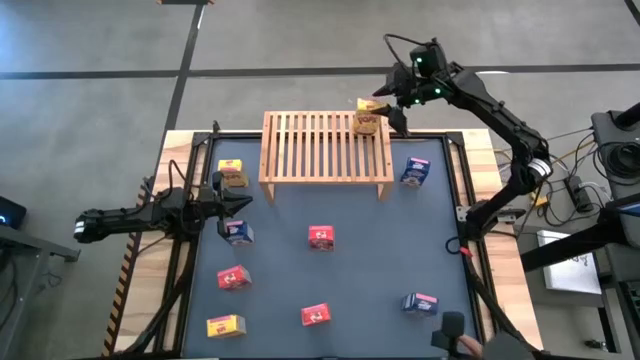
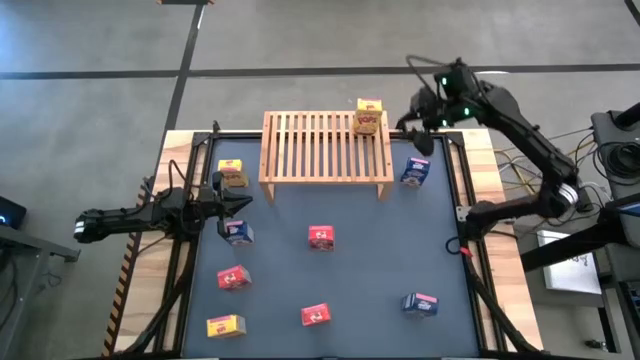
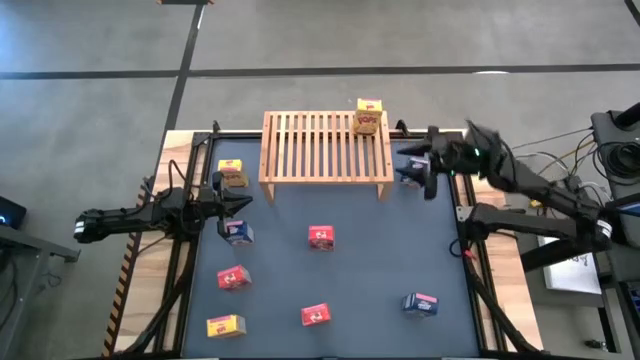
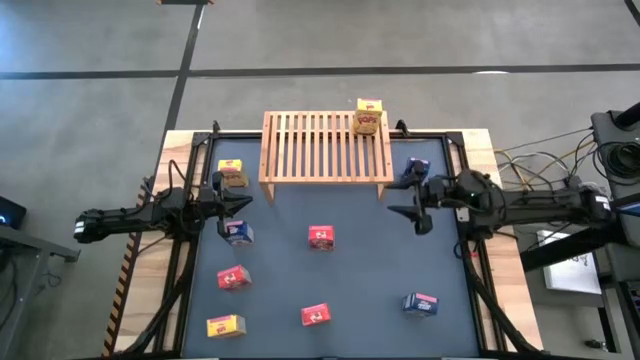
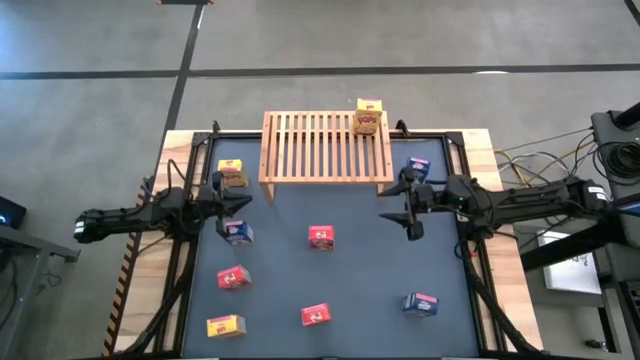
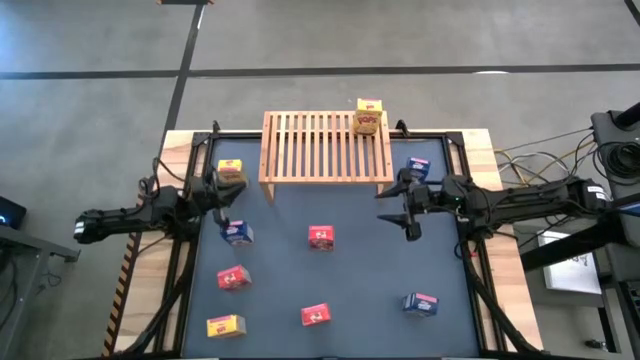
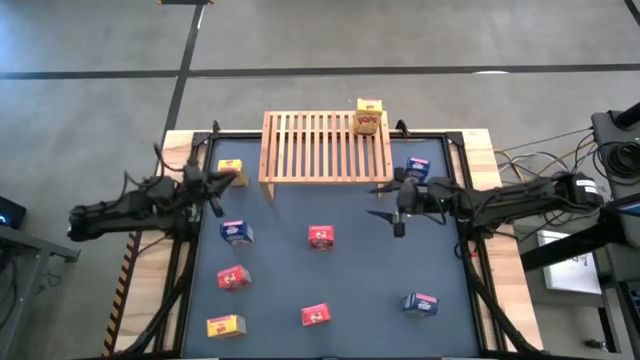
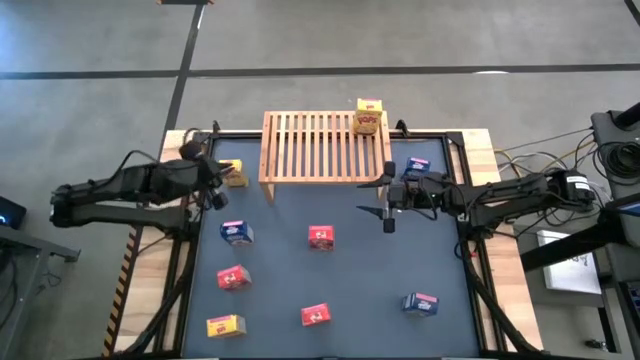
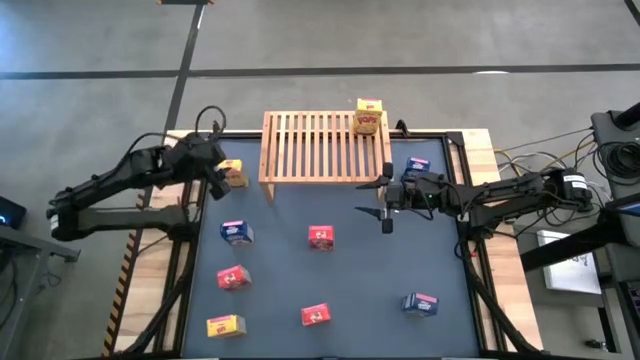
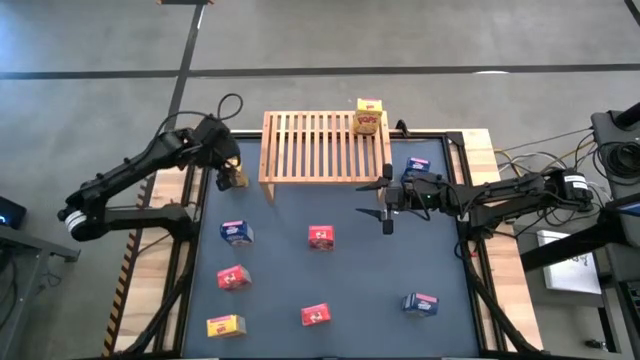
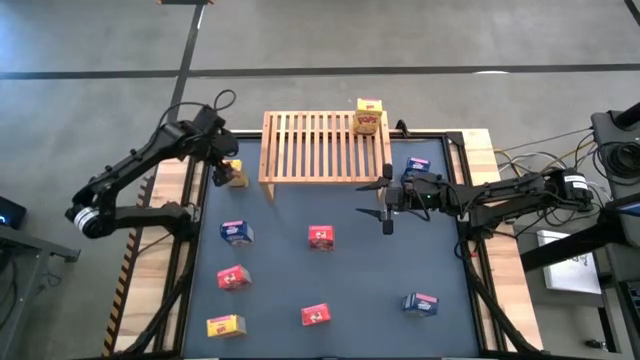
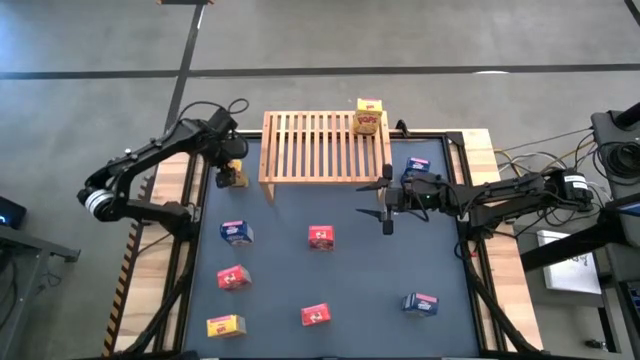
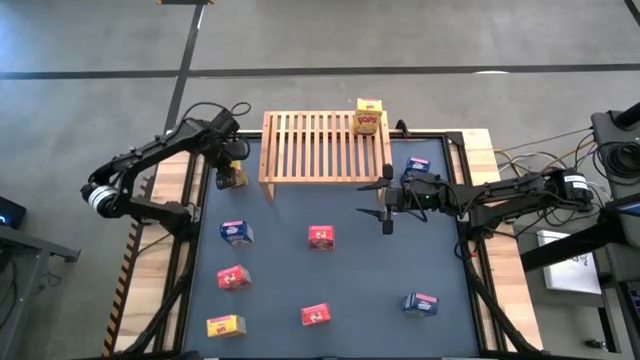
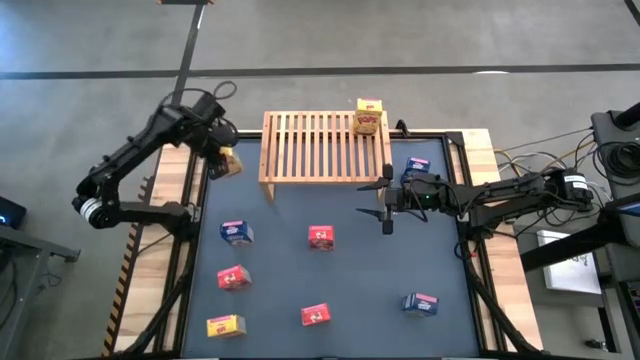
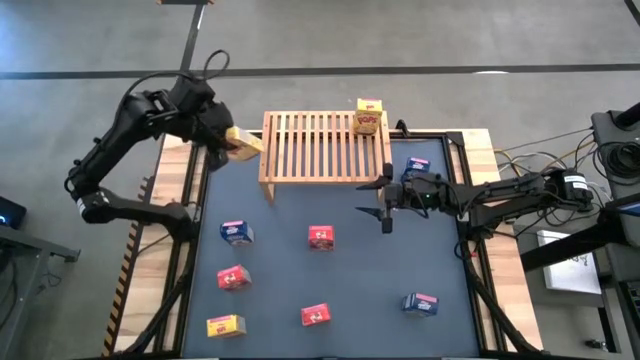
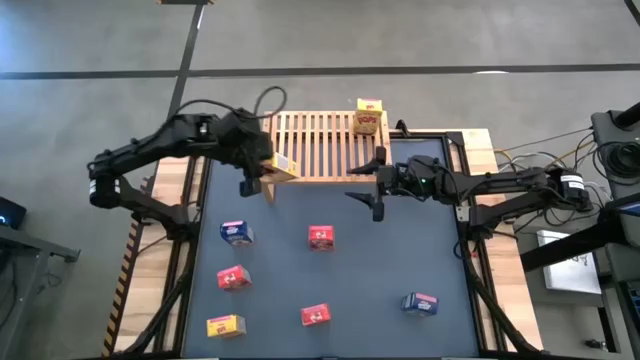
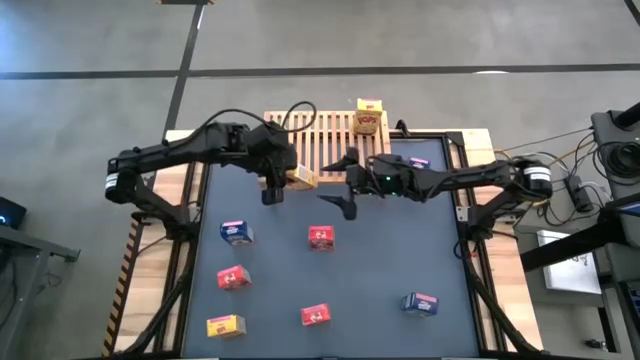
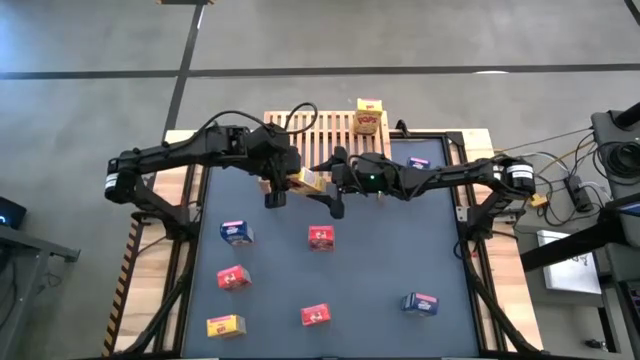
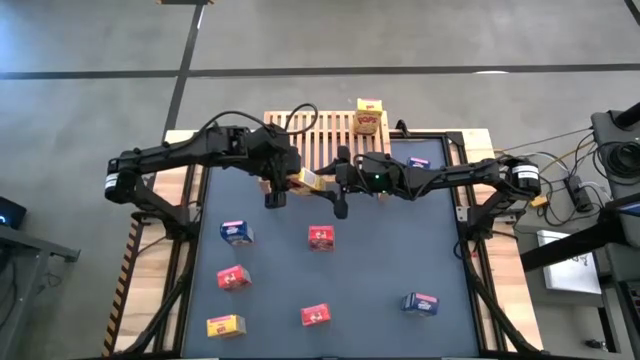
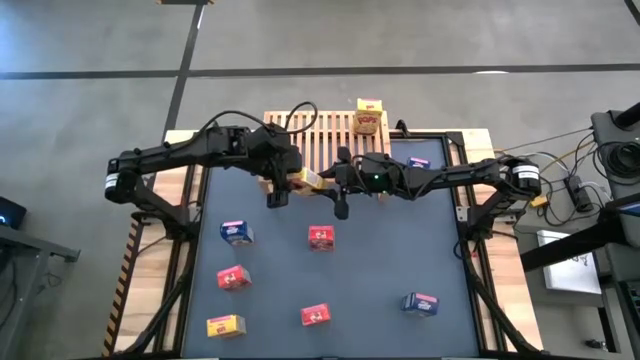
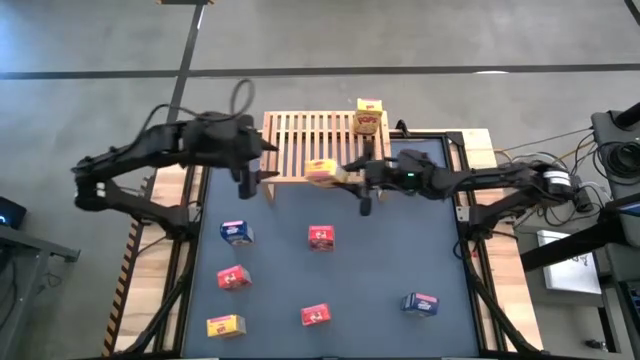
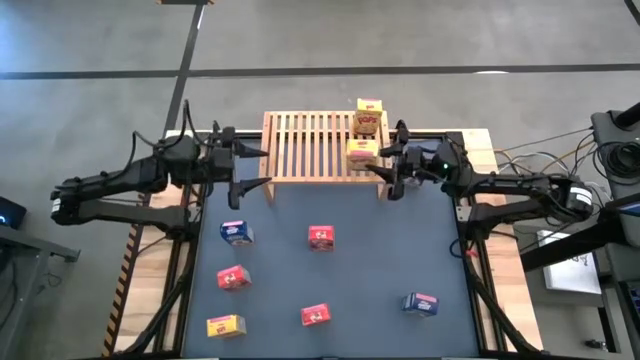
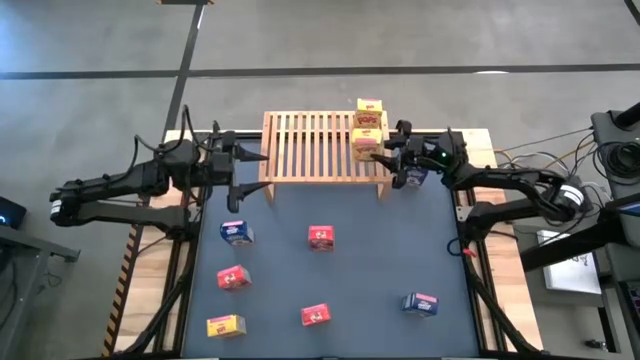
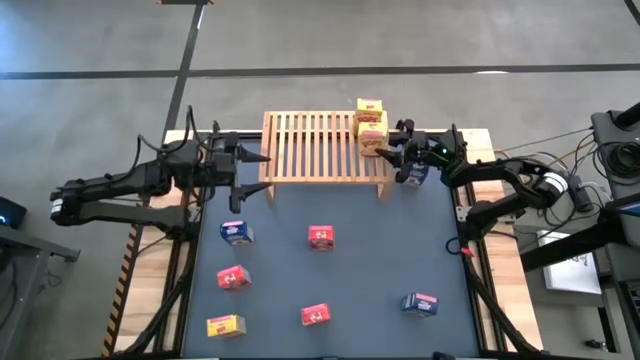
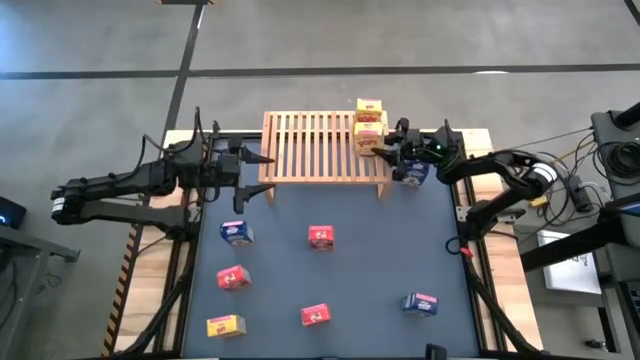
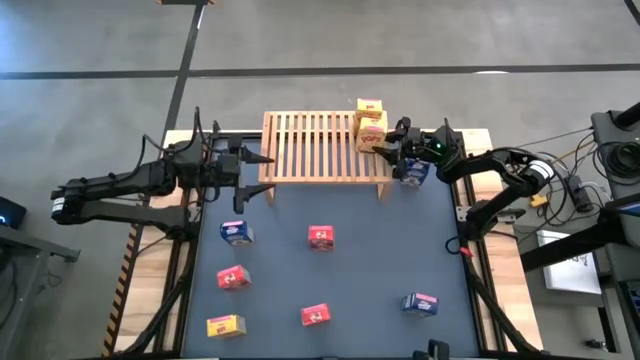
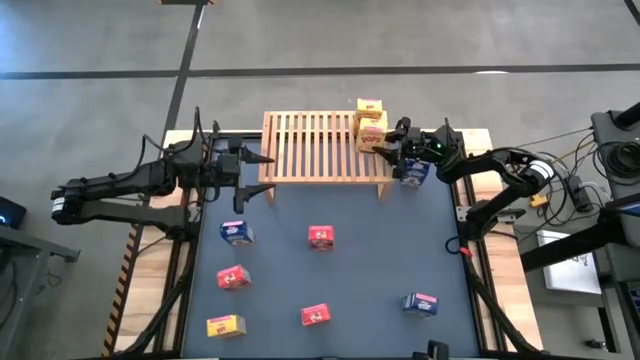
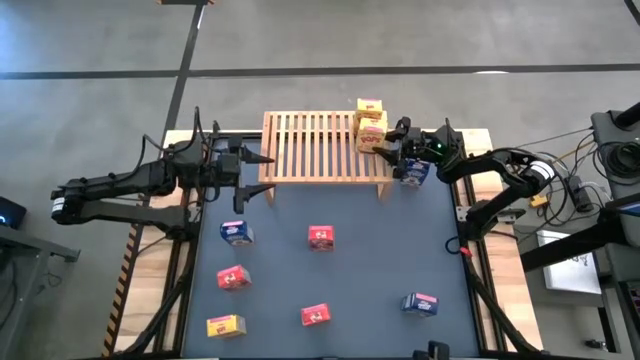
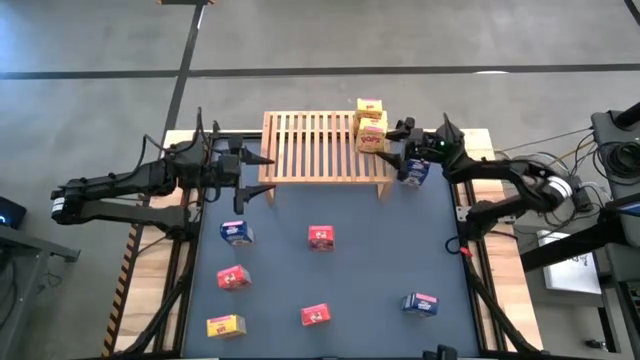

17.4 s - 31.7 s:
Task: Stack cereal on shelf
Put the top yellow cereal box on the shelf aligned with the other yellow cereal box

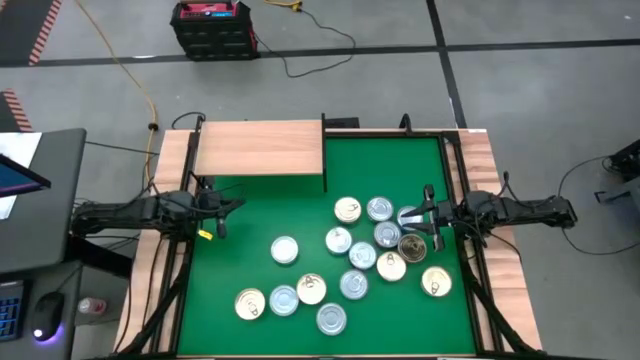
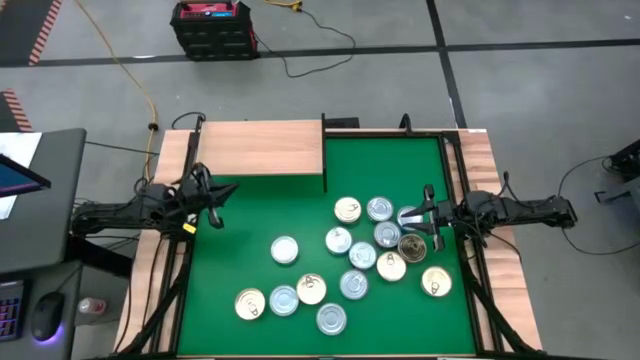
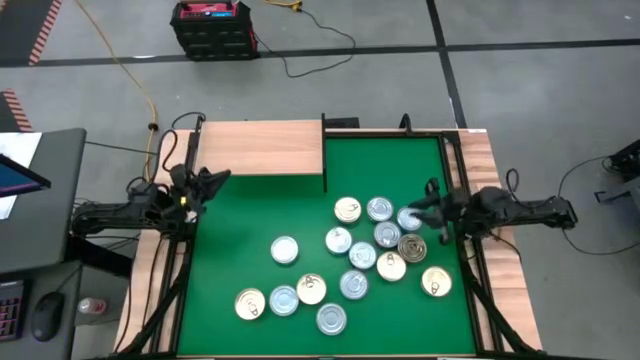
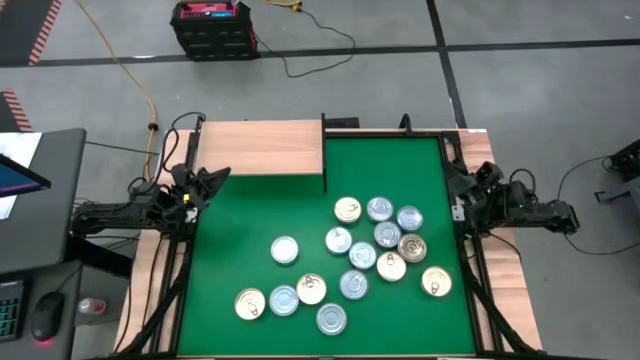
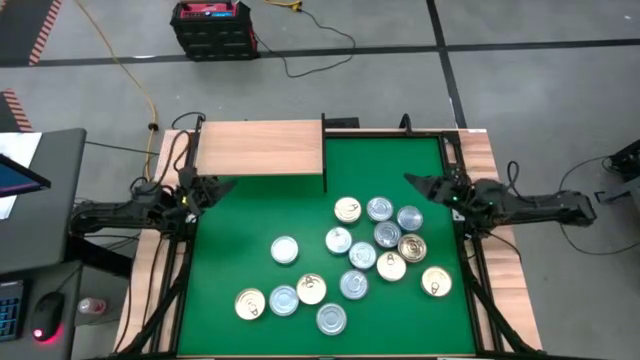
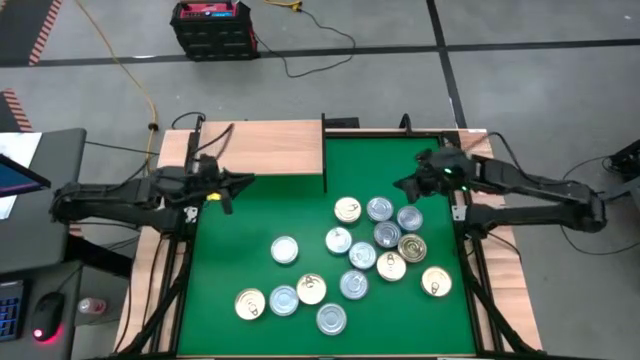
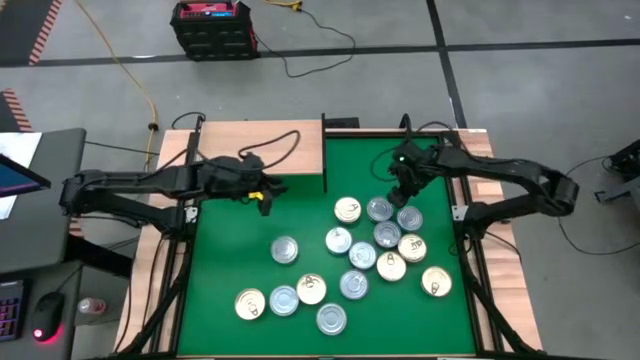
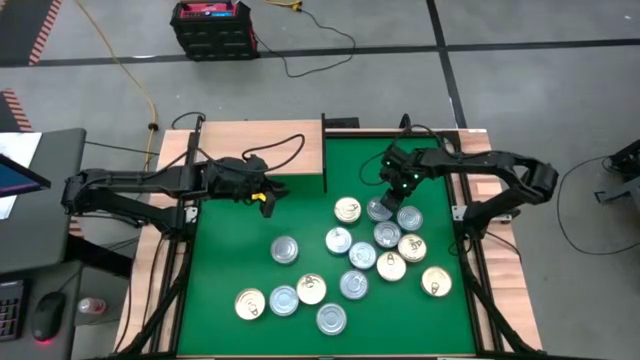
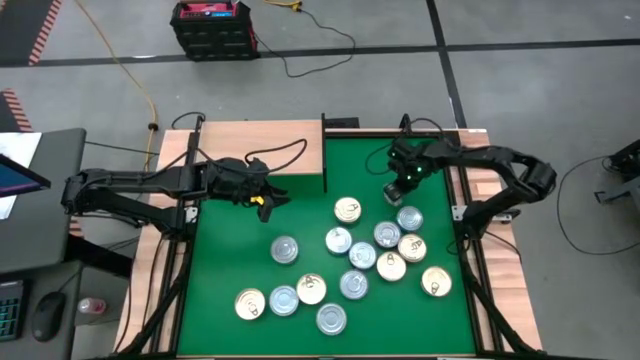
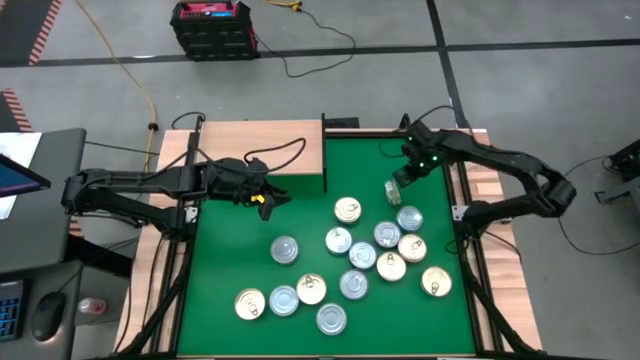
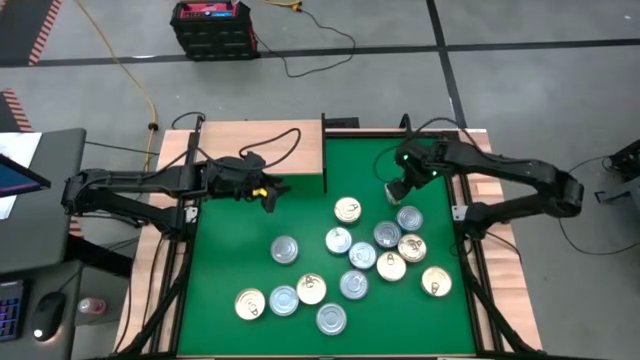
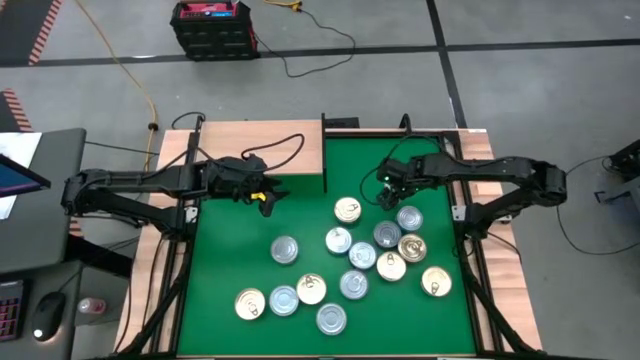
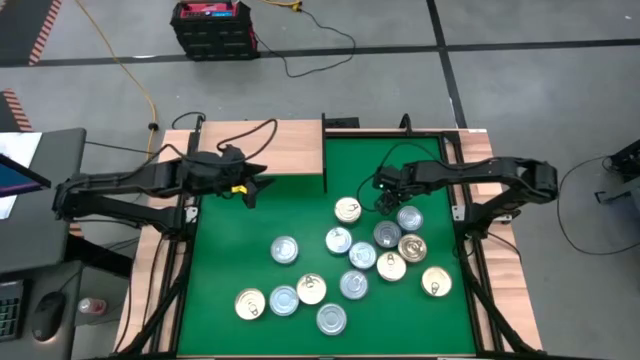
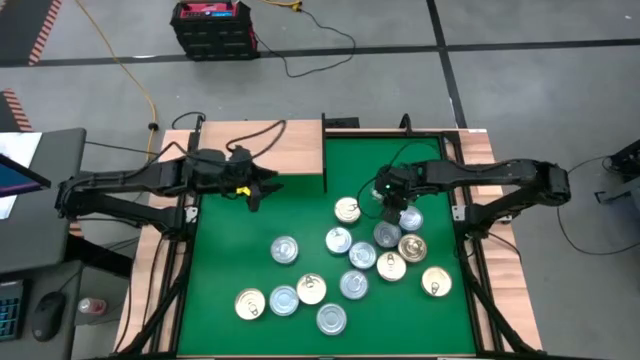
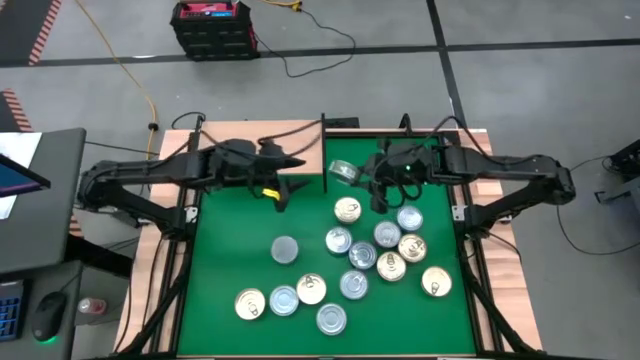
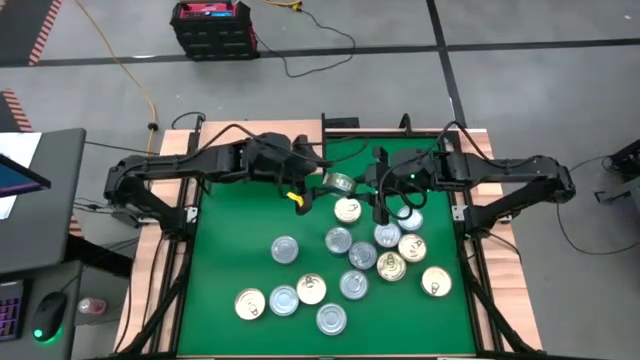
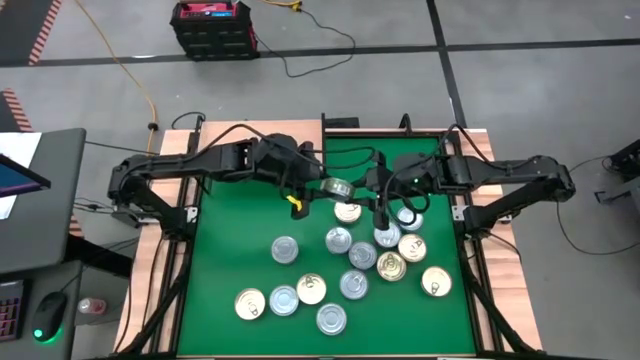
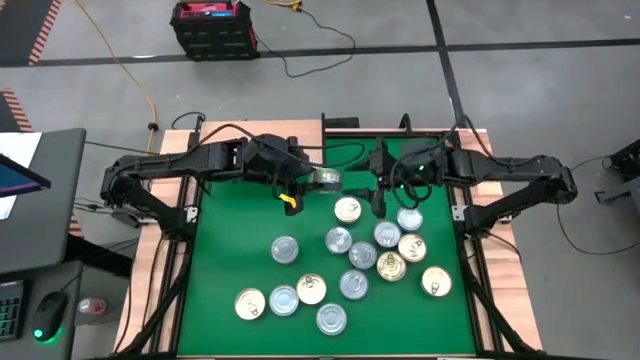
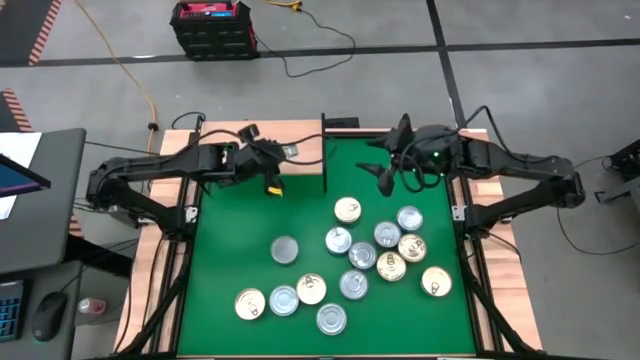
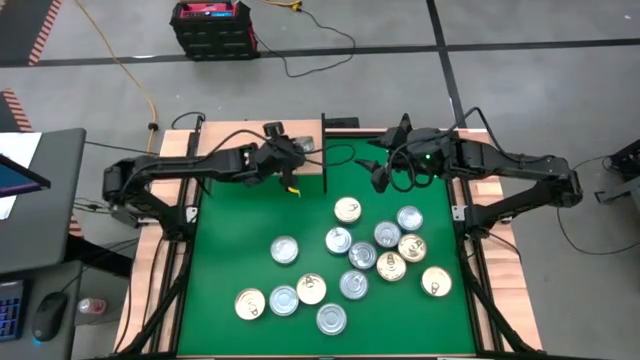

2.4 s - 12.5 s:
Task: Stack canned seafood by type on shelf
Put the green tuna can on the shelf
